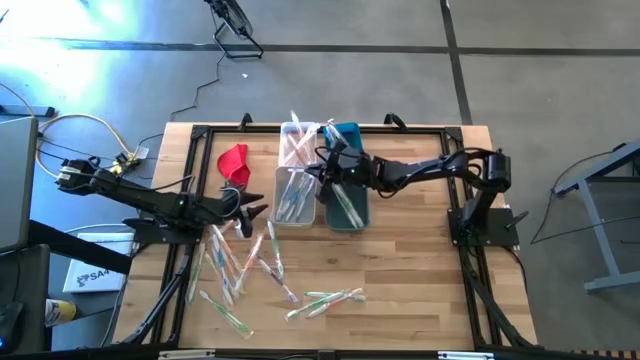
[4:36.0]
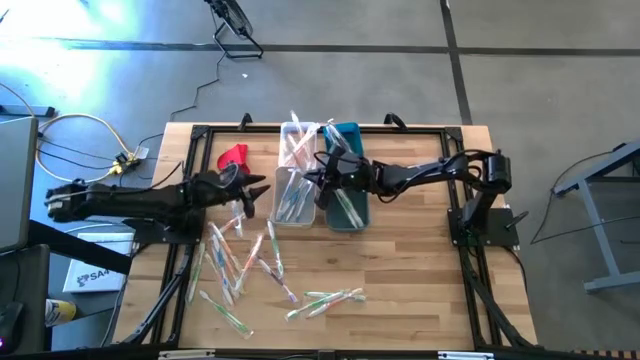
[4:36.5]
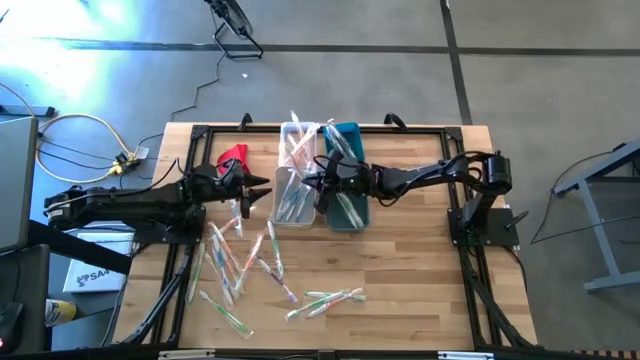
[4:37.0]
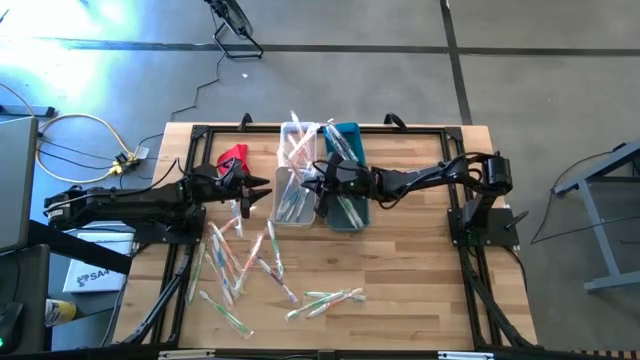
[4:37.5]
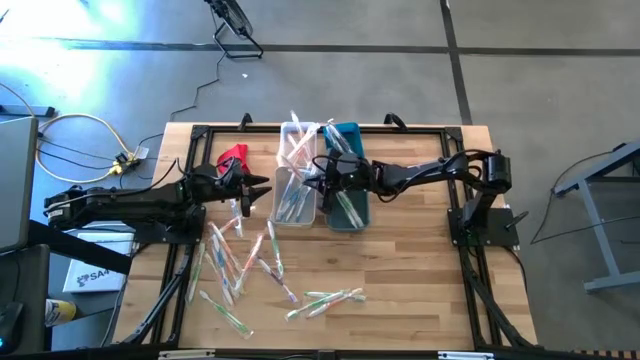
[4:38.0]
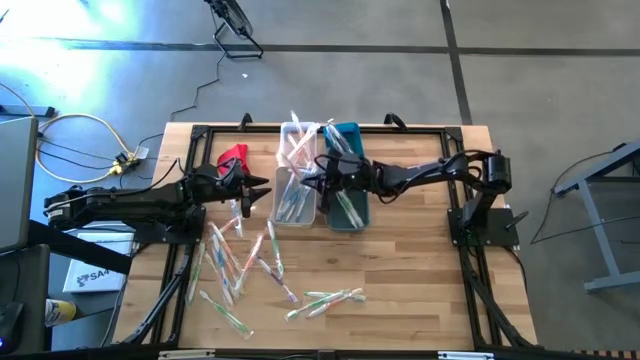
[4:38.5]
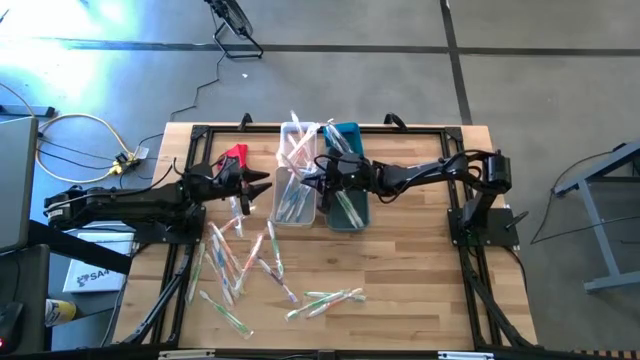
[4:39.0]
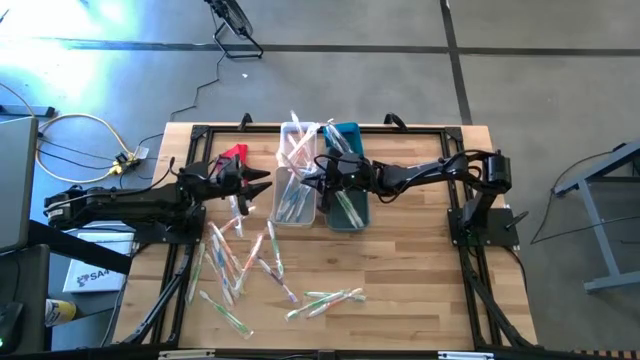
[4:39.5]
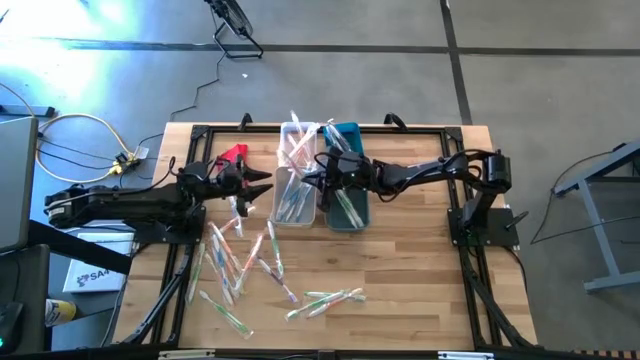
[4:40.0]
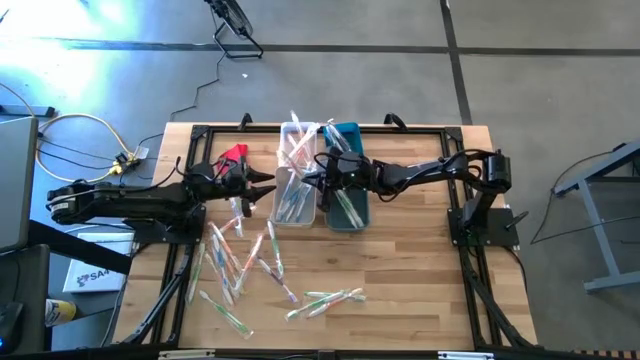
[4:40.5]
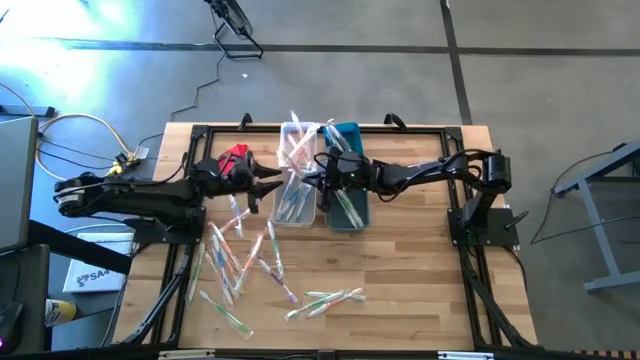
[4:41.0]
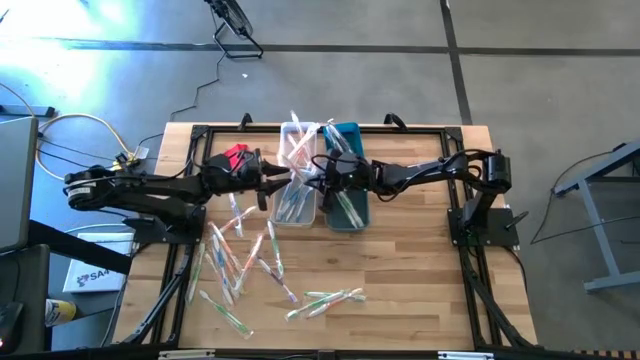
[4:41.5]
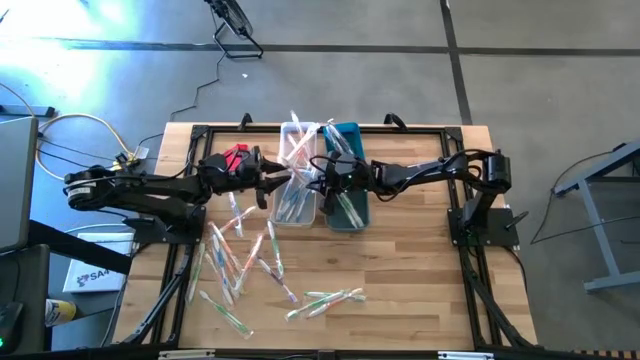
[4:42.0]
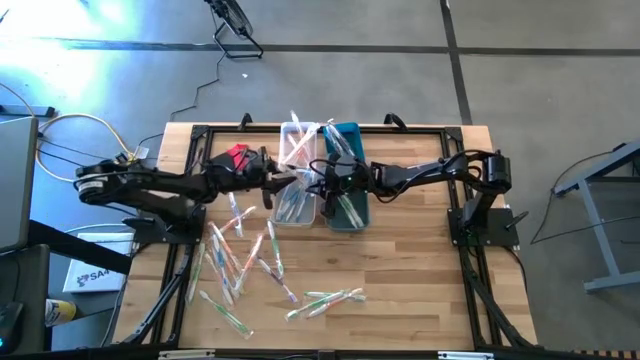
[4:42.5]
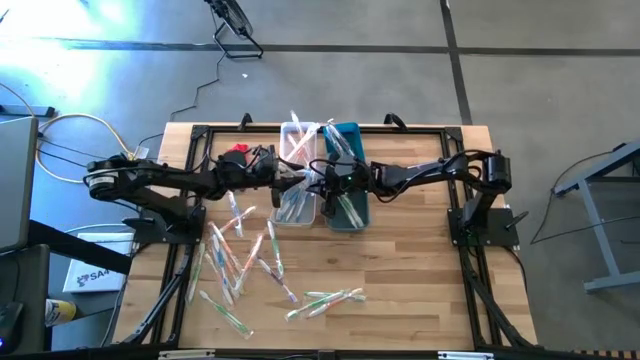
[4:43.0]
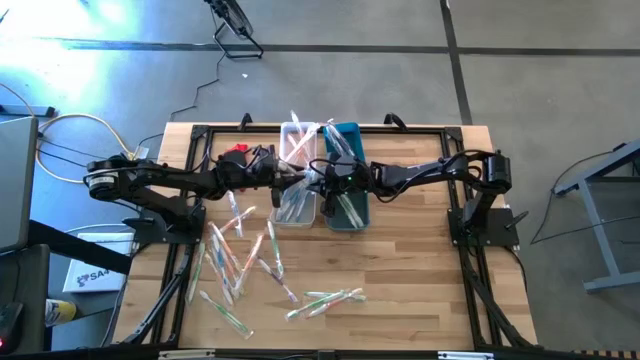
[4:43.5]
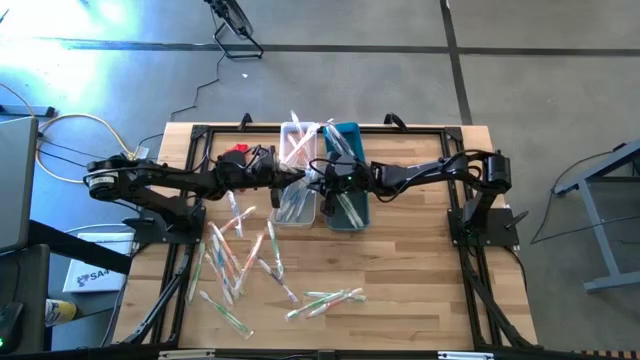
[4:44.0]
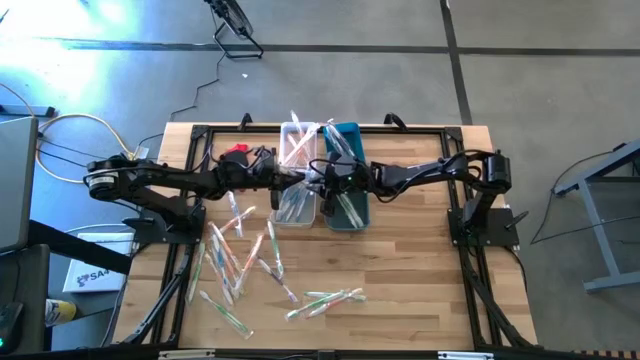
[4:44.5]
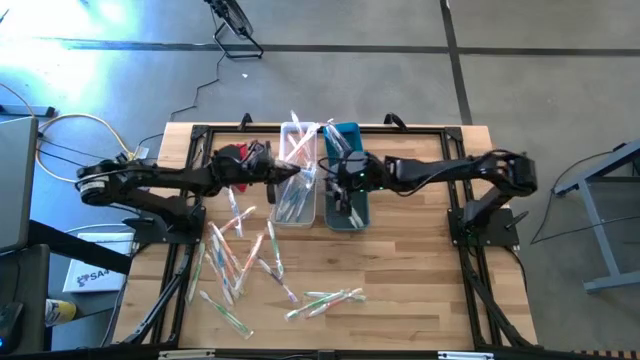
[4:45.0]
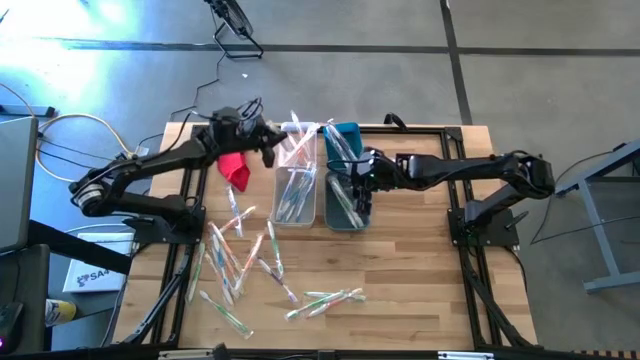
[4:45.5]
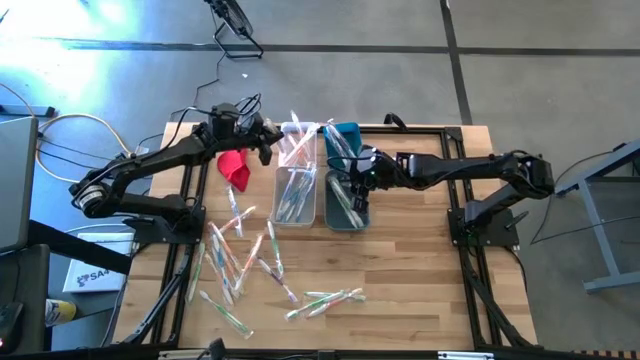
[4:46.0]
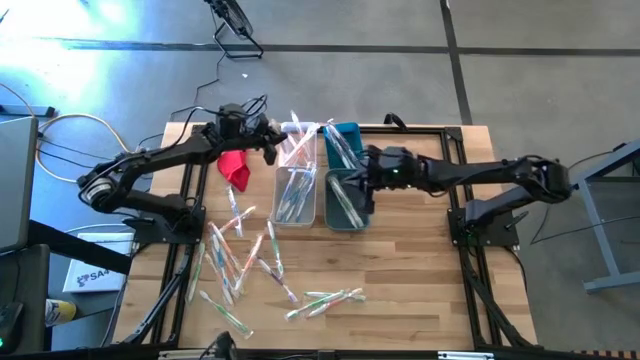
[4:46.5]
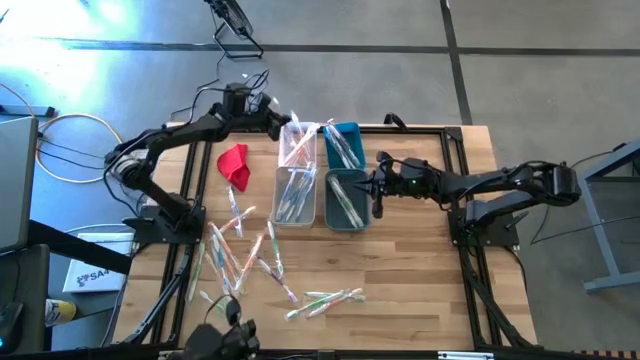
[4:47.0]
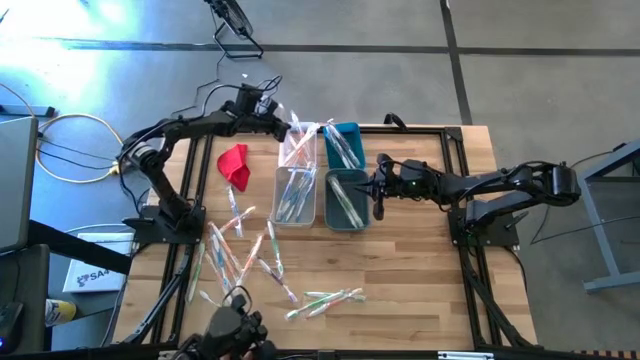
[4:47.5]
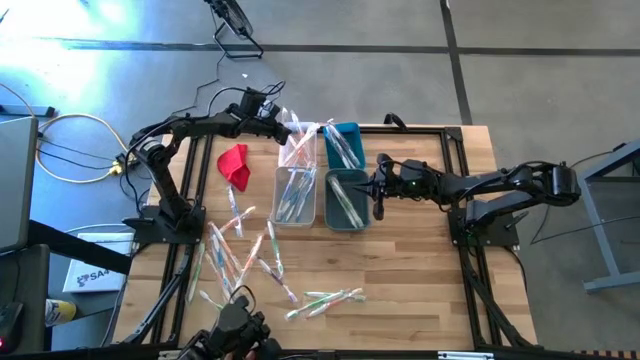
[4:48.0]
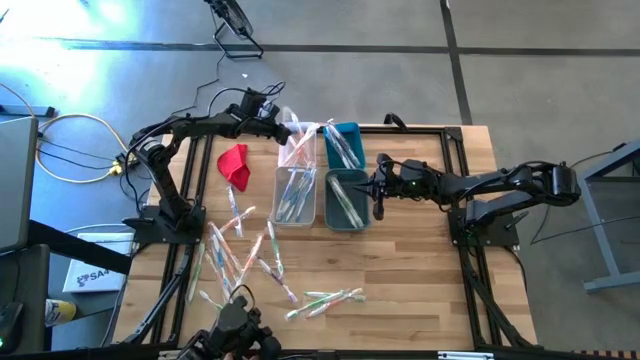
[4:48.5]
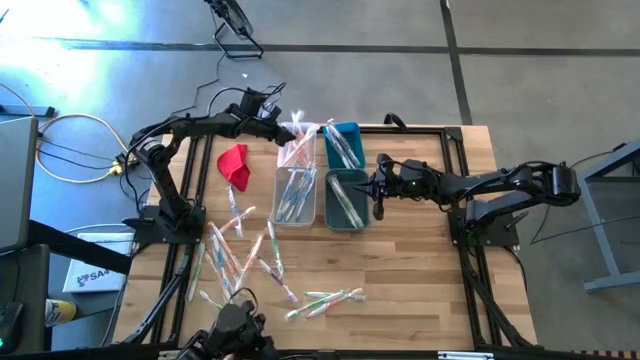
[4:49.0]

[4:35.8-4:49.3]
Task: Pick & Place Toothbrushes
Put the orange toothbrush into the transparent bin
